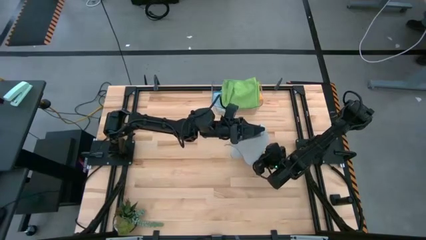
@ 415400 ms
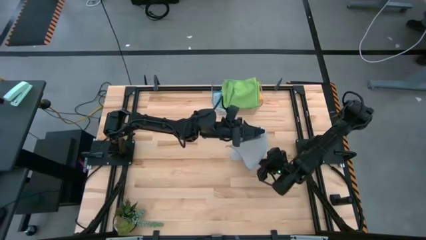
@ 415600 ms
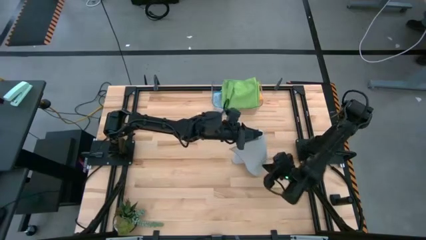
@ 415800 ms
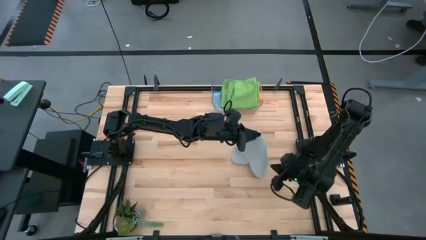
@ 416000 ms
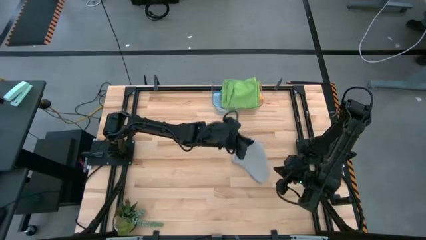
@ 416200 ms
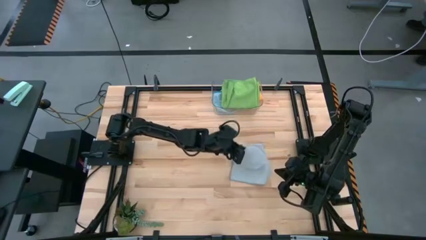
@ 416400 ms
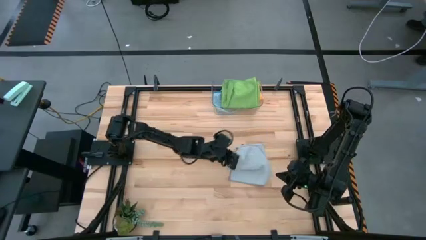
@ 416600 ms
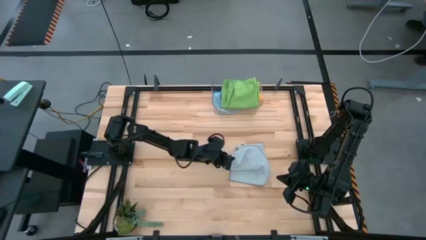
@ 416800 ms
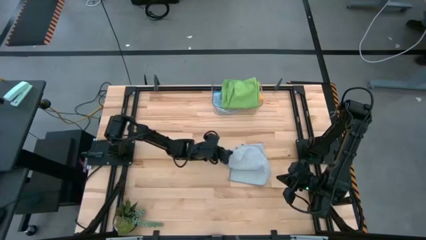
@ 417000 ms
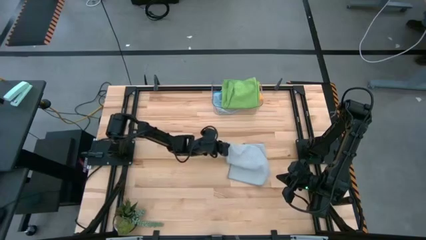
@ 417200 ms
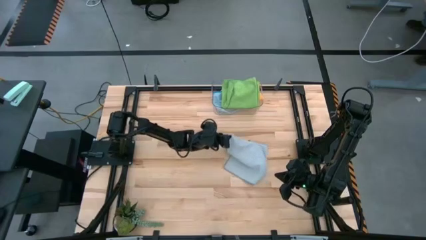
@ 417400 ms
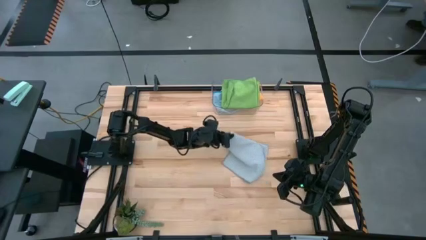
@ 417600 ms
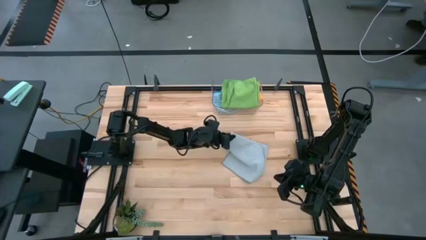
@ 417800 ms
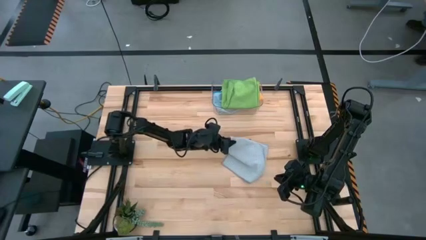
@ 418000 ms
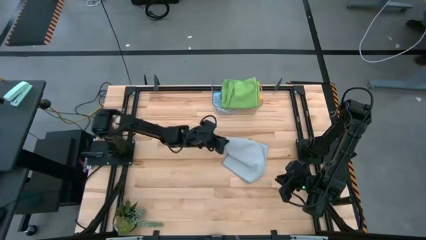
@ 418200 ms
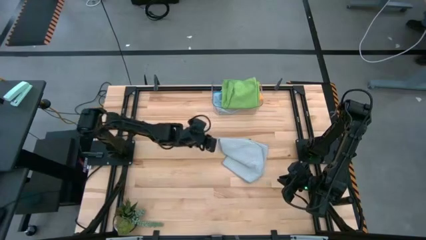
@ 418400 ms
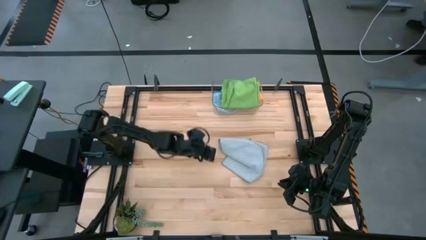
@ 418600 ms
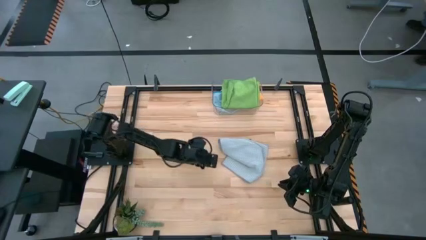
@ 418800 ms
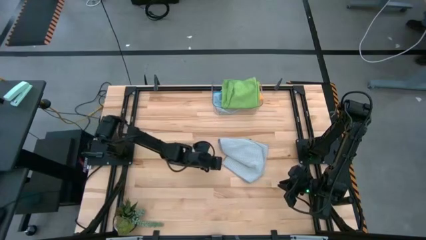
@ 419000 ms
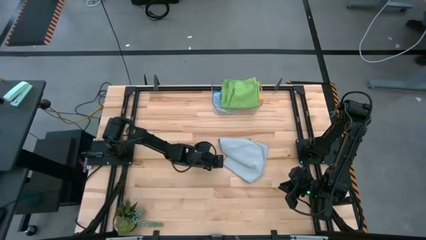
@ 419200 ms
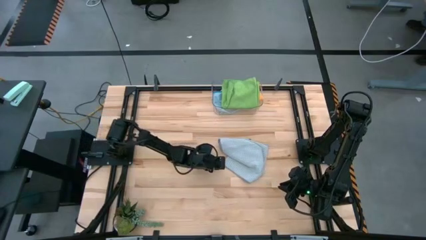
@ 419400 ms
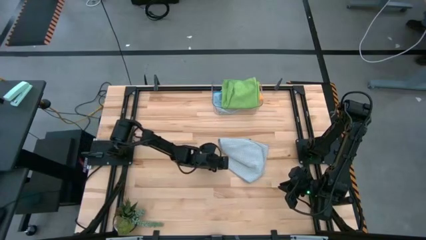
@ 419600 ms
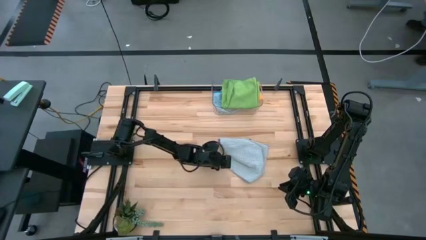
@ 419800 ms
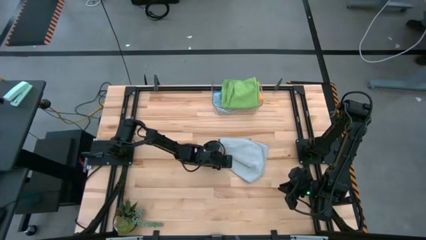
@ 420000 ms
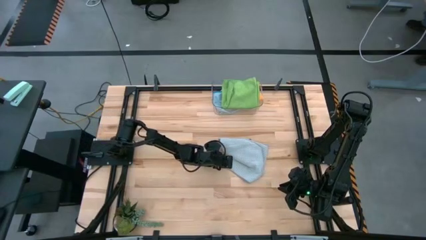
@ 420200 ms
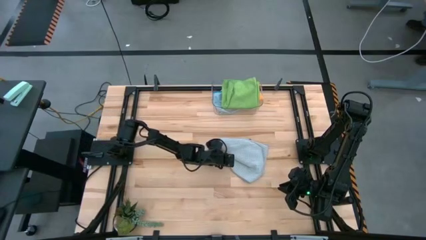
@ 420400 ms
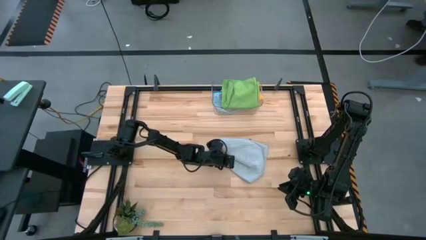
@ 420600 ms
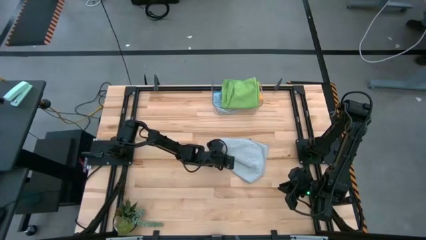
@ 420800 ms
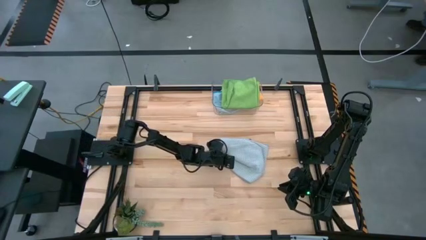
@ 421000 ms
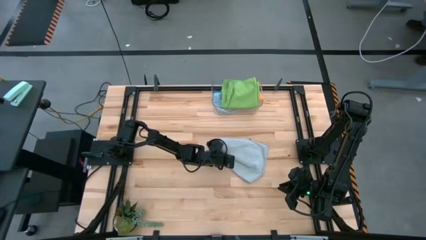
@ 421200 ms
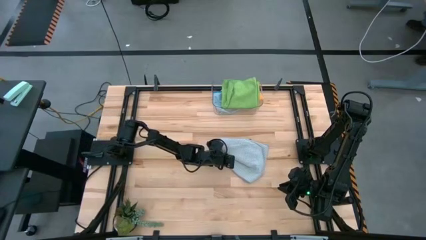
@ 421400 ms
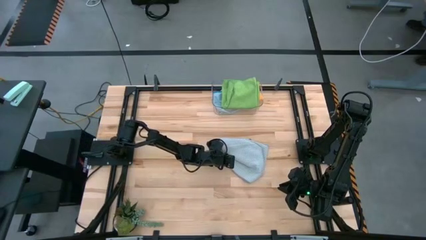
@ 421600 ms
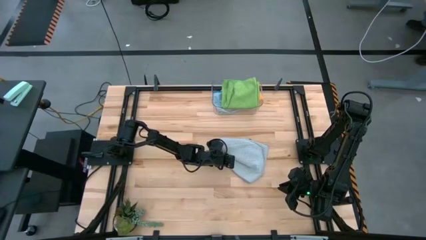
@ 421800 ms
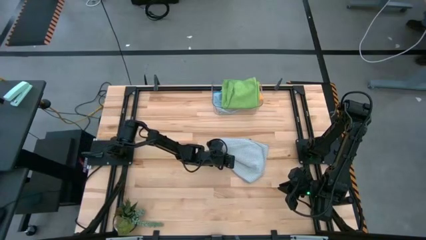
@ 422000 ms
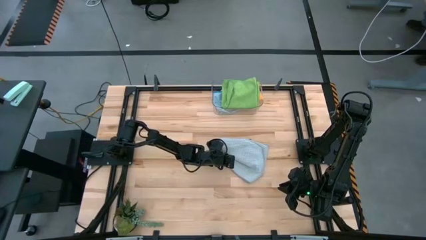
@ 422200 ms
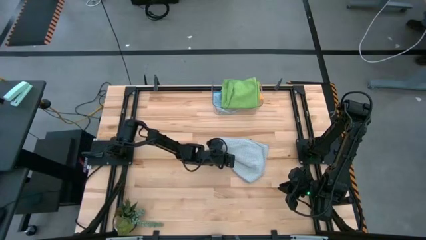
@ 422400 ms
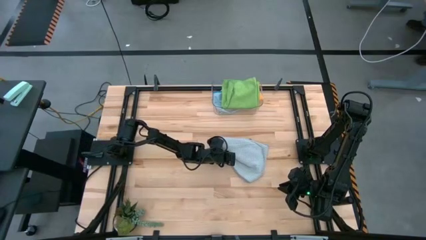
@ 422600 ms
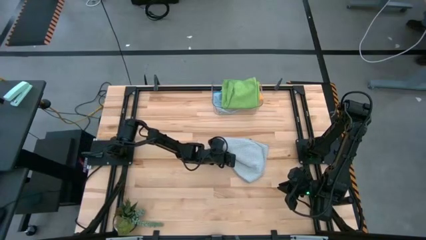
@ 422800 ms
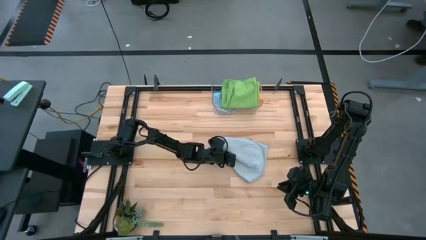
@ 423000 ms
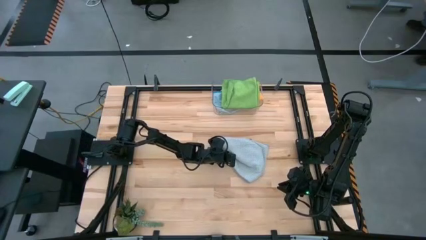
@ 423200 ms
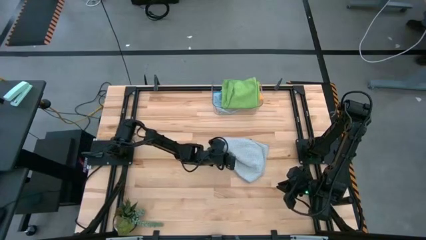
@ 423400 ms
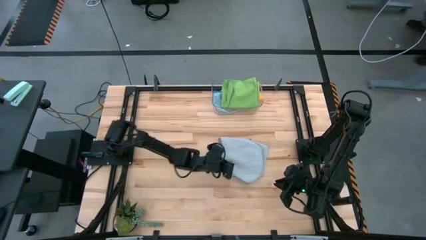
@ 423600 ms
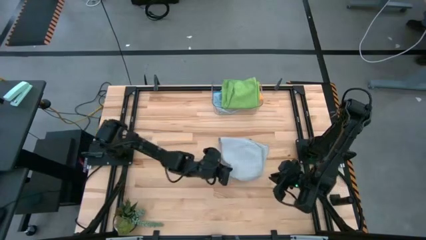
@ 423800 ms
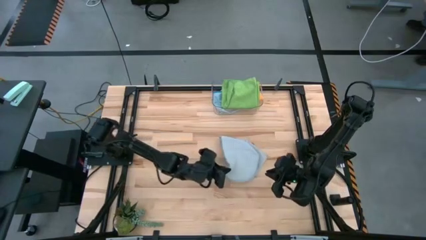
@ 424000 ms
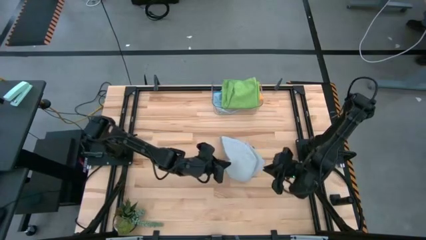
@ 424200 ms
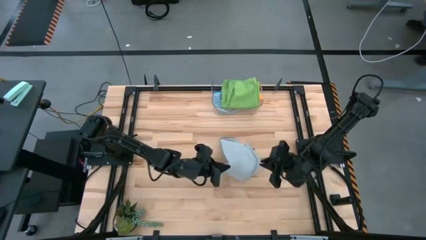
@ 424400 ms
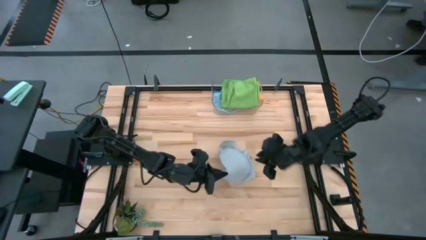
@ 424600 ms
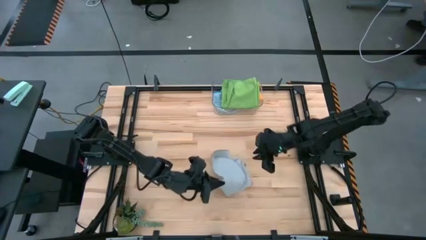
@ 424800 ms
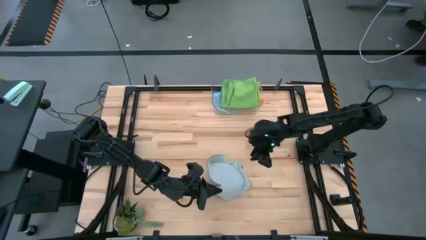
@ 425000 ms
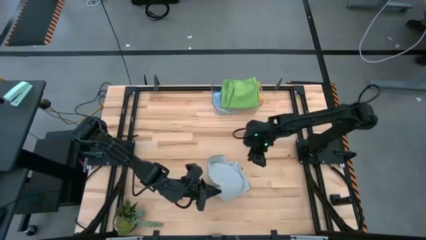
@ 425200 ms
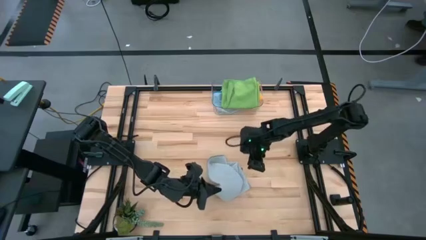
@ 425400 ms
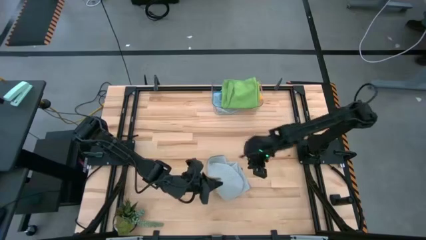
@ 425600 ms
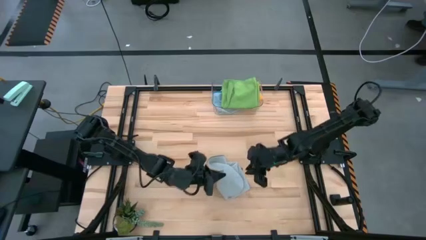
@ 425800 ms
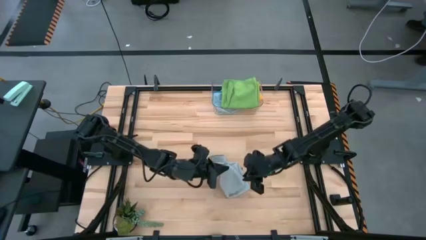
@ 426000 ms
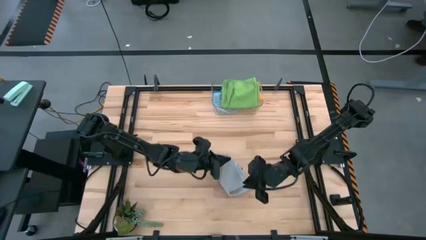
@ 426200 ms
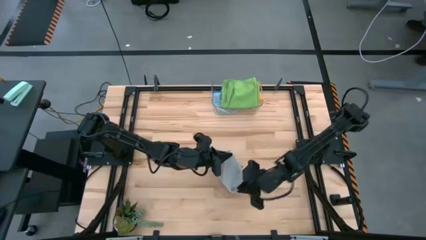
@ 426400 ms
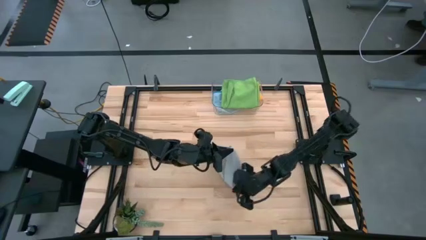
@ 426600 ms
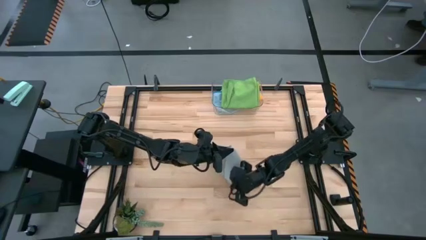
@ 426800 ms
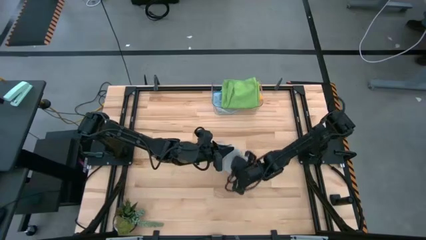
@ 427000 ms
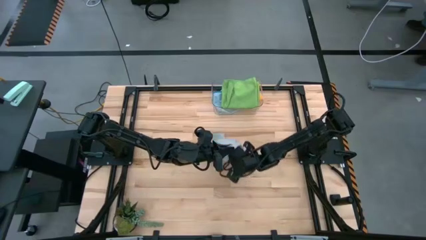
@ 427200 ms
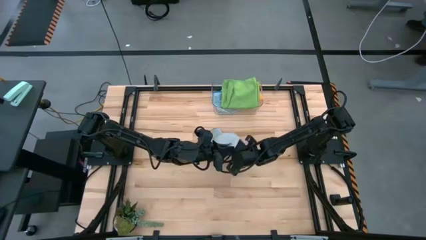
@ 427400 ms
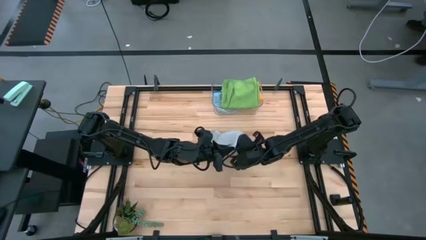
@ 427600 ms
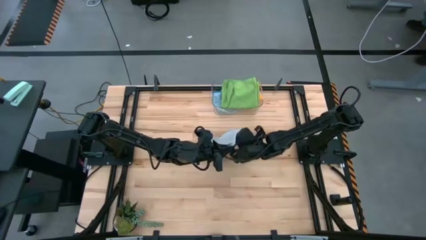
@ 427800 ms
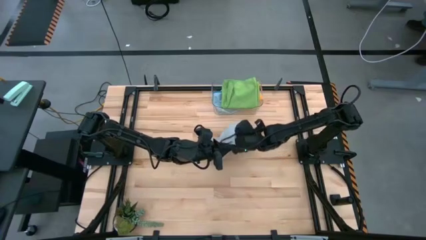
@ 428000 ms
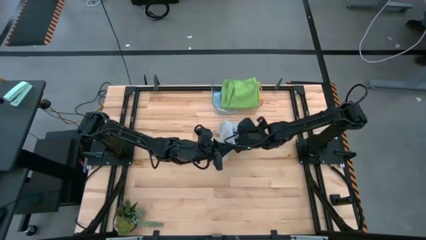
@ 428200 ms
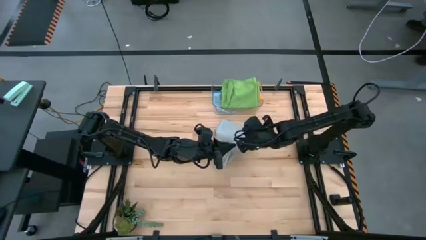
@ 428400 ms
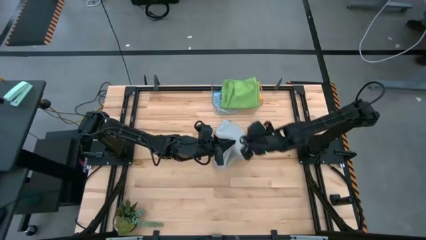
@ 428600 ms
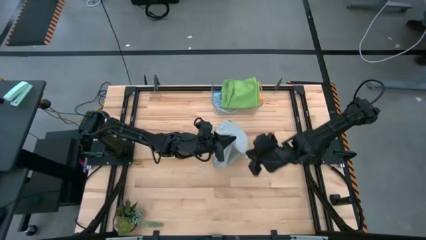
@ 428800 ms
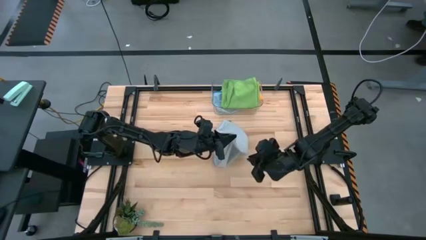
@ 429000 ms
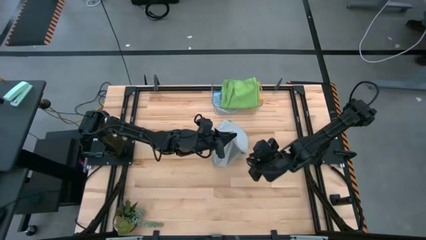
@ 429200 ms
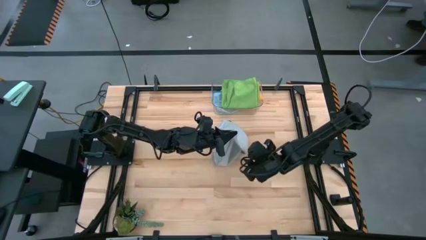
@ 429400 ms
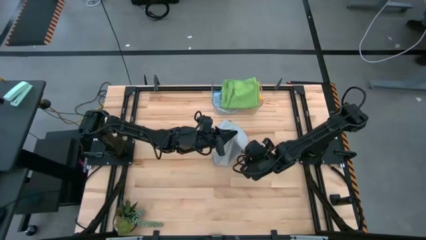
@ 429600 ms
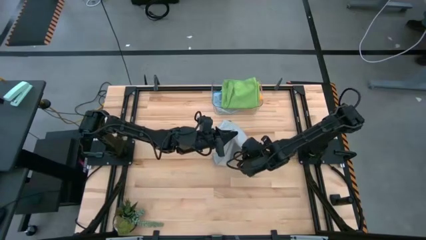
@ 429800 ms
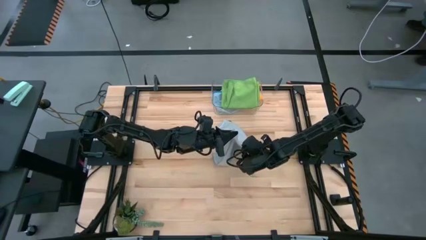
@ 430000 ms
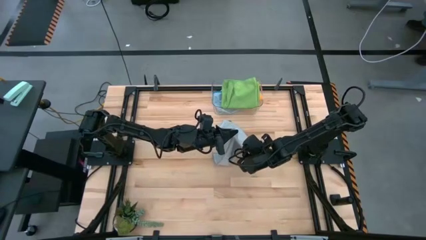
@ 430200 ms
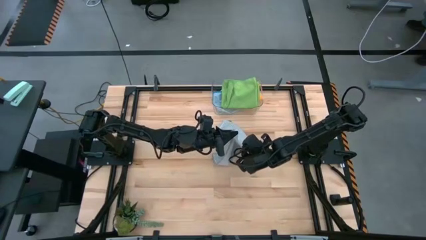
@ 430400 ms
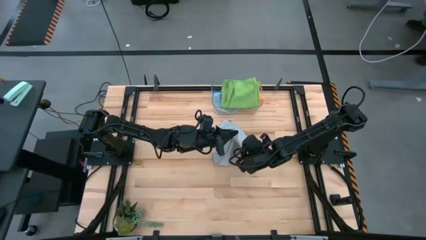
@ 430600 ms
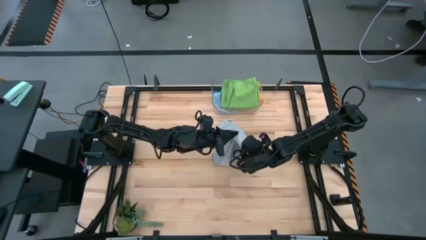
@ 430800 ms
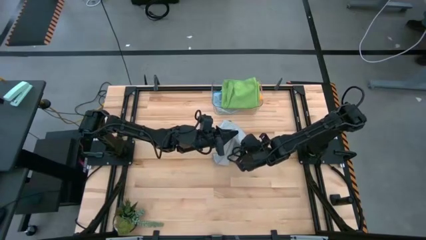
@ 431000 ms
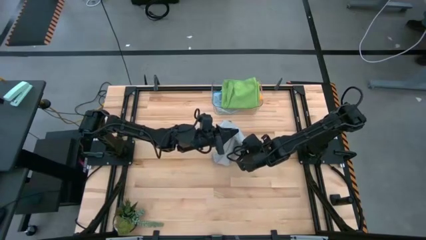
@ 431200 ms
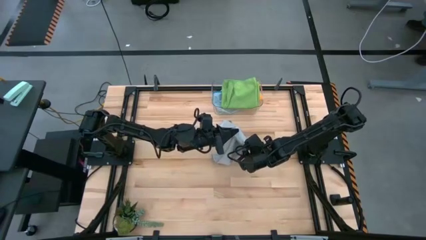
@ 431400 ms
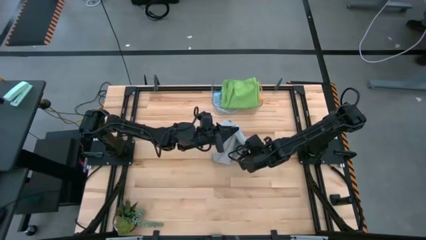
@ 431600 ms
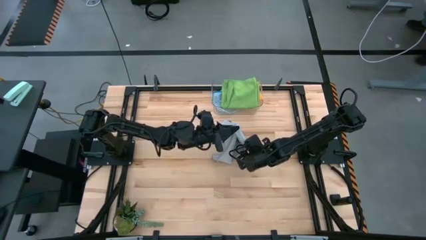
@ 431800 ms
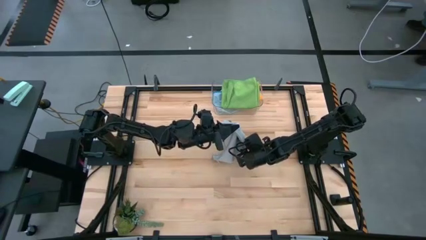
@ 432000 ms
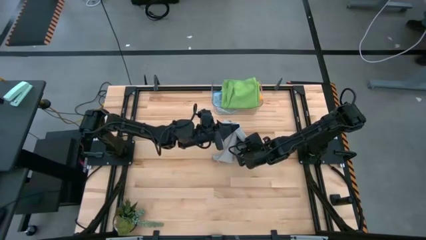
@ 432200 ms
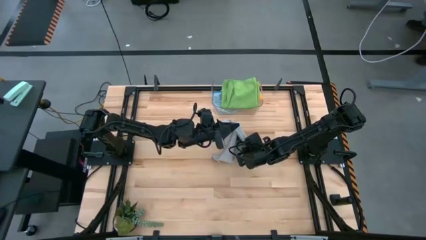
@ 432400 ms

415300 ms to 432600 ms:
Task: Fold microfiber towels
Fold the gray microfiber cloth
